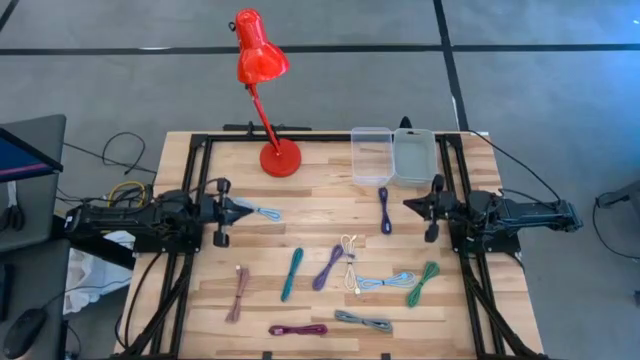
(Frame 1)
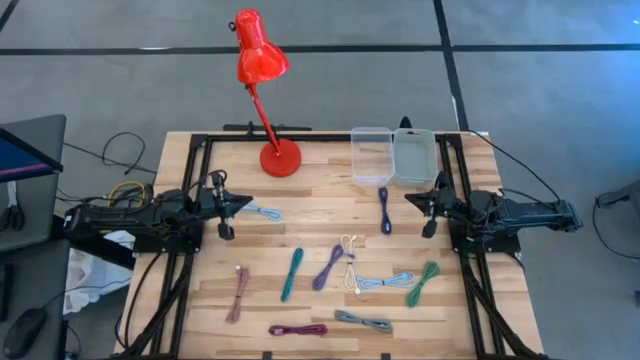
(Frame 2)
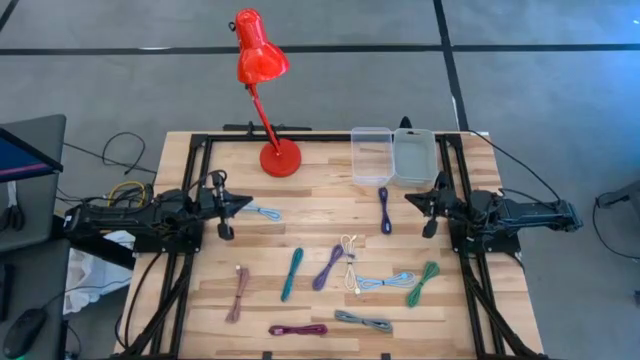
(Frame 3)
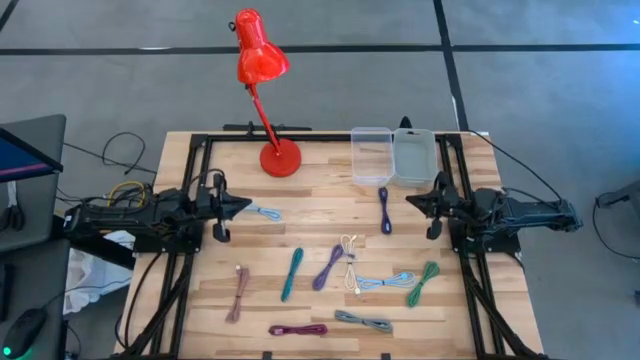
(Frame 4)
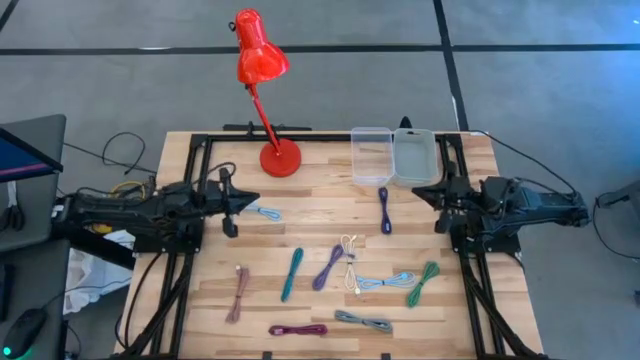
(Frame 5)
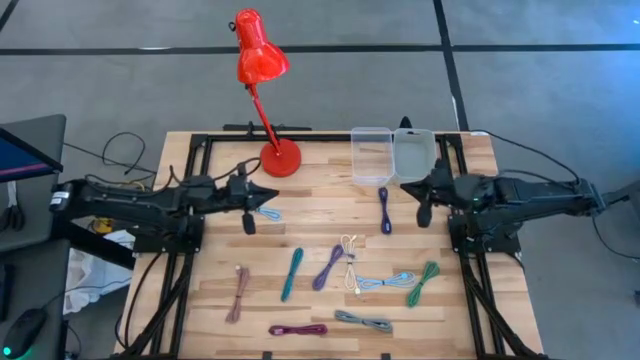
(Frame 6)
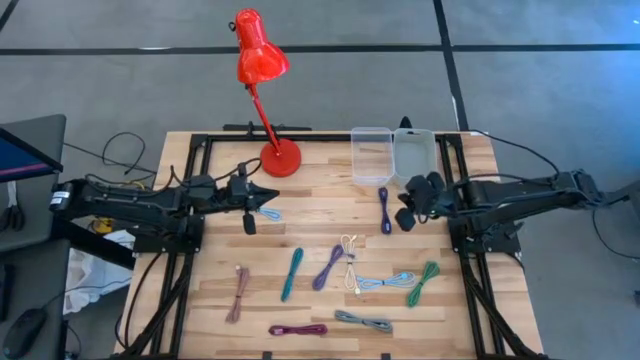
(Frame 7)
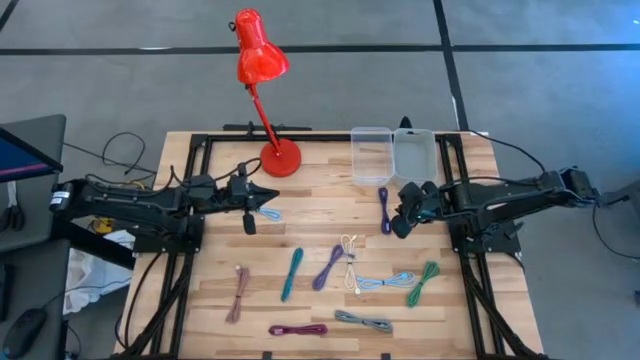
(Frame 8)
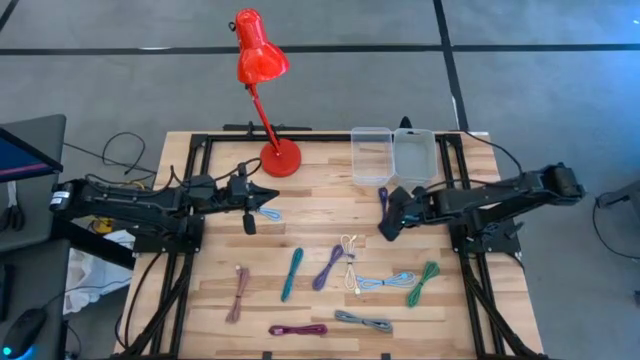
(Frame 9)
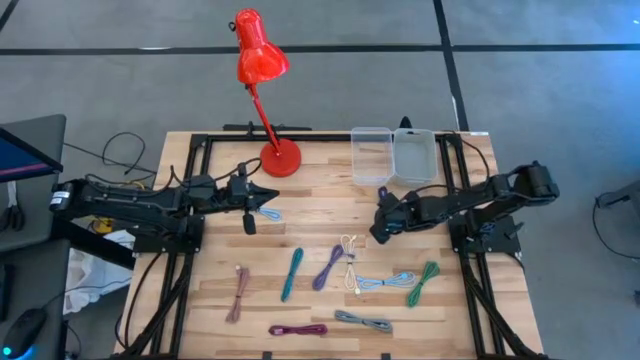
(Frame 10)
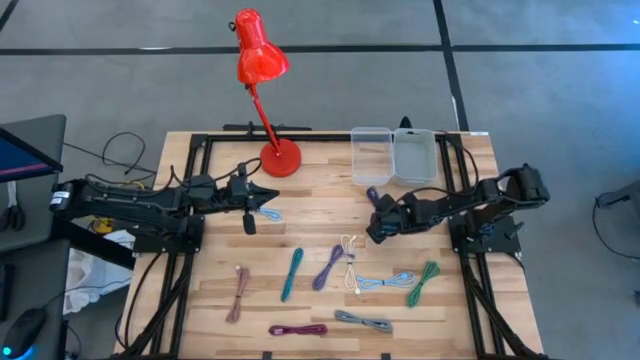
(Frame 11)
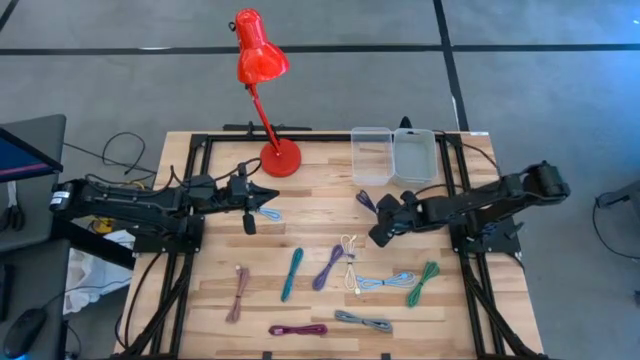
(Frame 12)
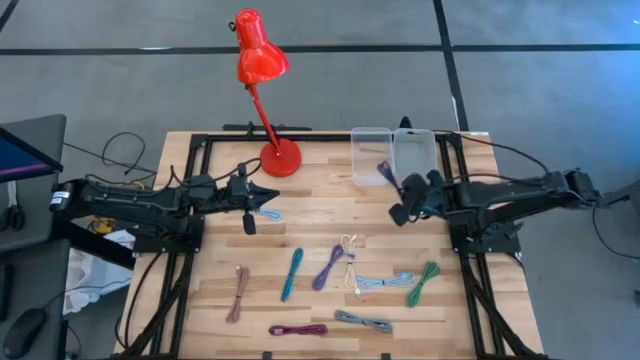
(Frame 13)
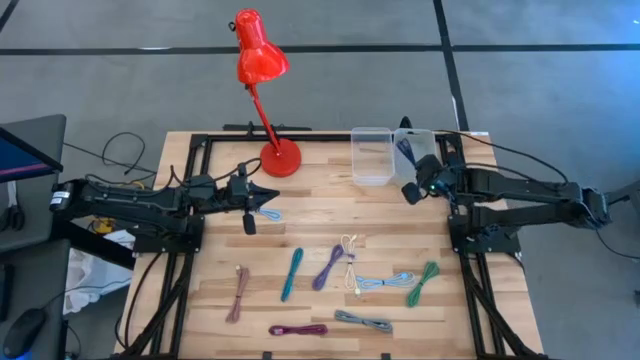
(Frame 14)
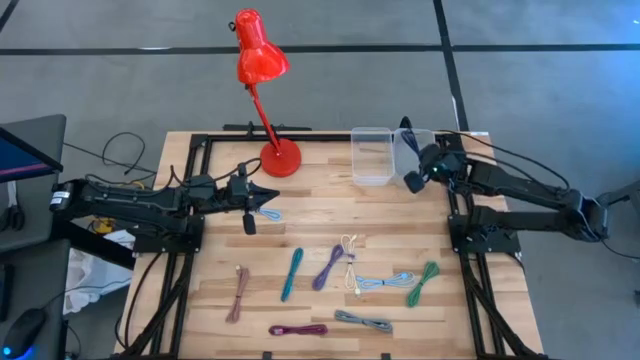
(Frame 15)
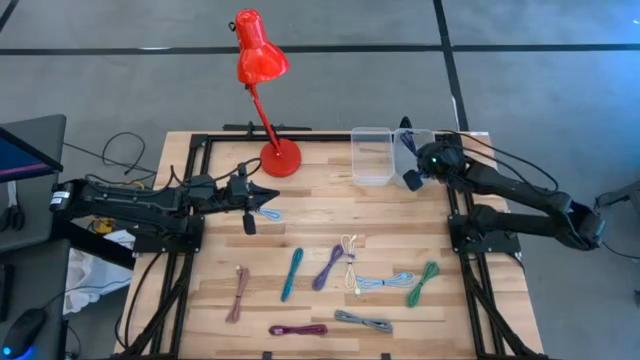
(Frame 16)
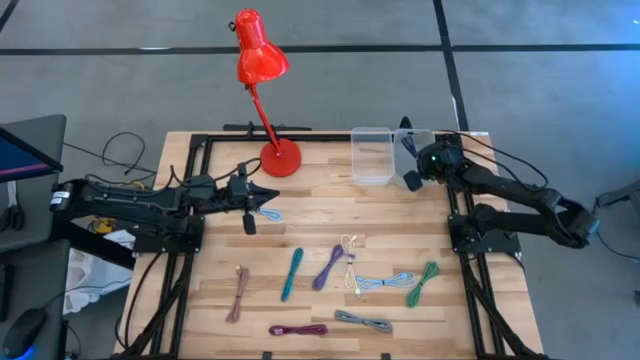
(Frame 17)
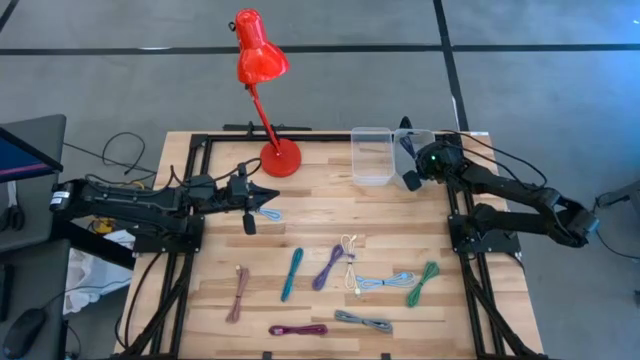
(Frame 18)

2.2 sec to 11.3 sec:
Task: Pick & Place USB Port
Put the black and violet charger cable into the gray bin

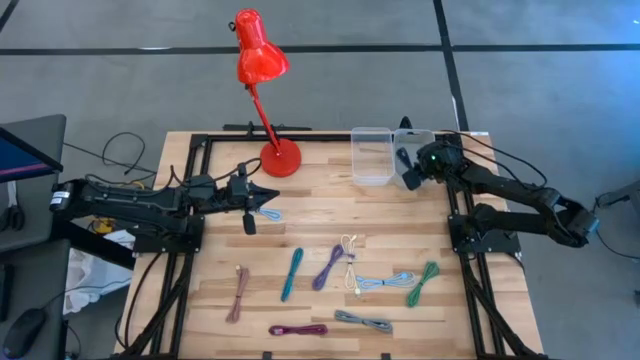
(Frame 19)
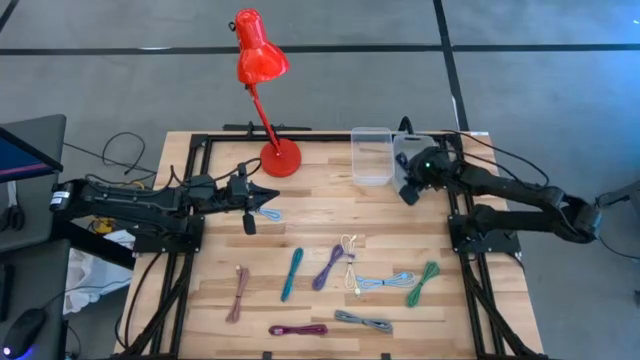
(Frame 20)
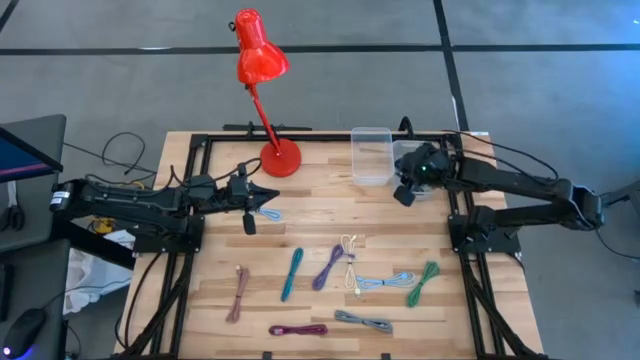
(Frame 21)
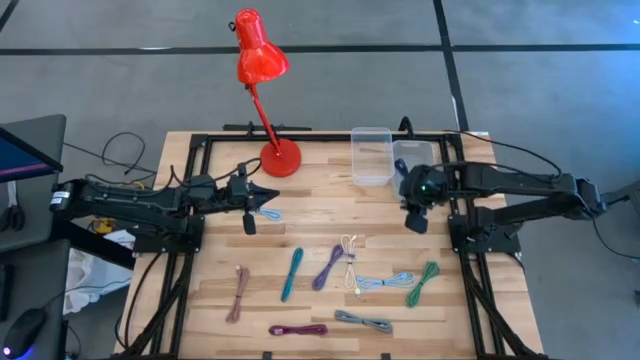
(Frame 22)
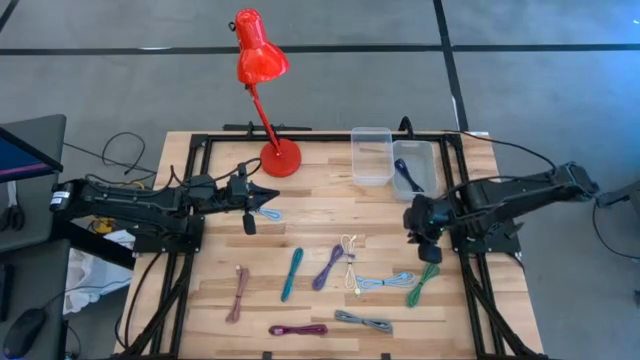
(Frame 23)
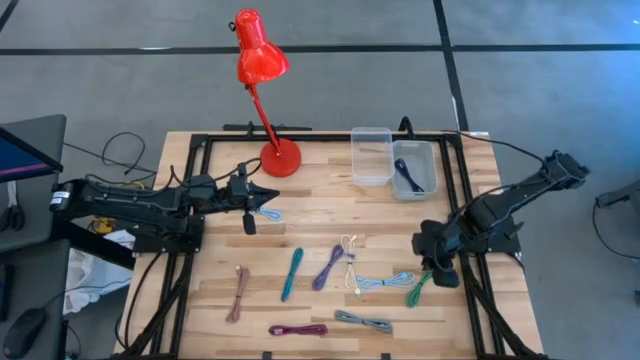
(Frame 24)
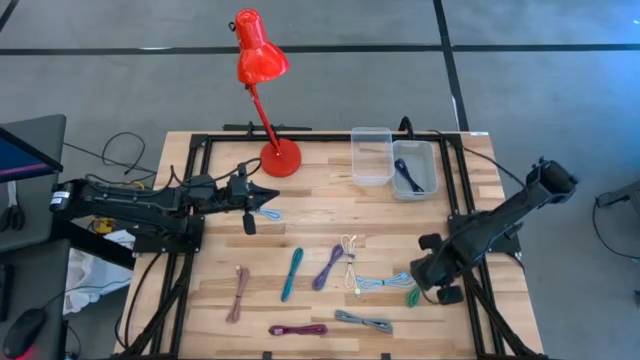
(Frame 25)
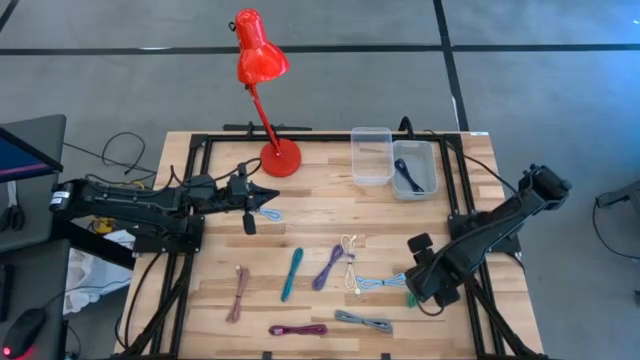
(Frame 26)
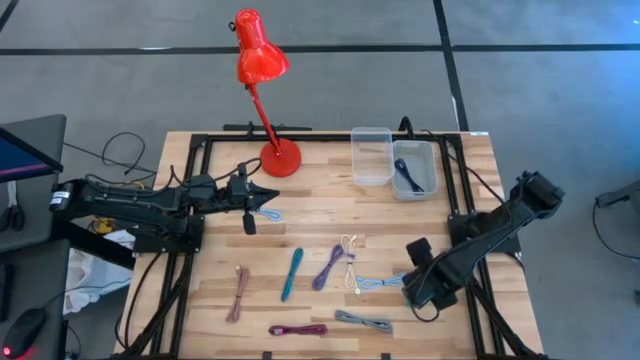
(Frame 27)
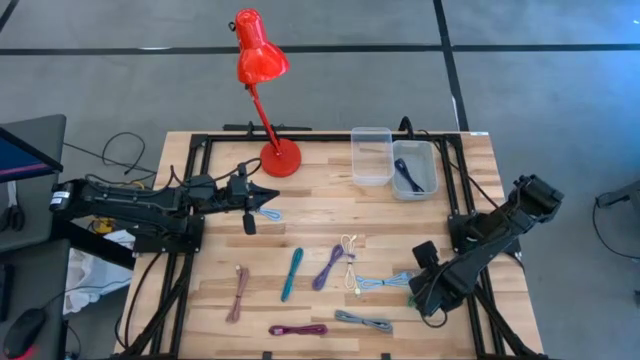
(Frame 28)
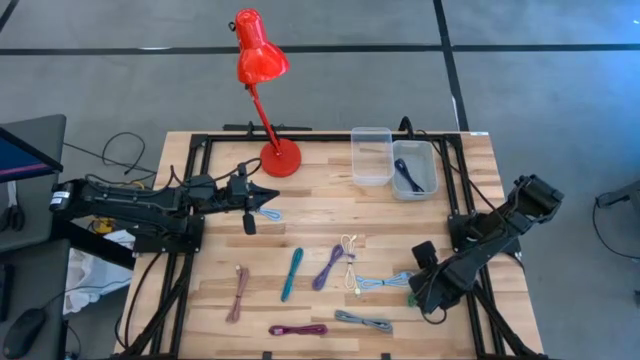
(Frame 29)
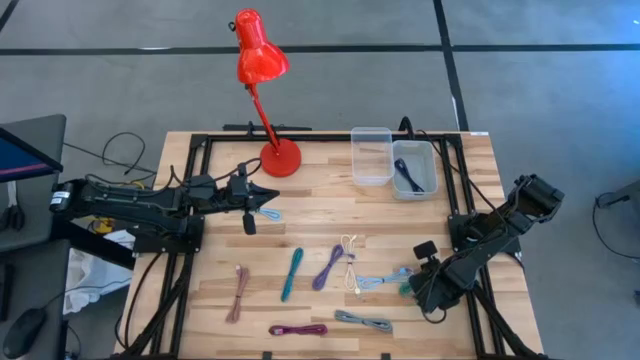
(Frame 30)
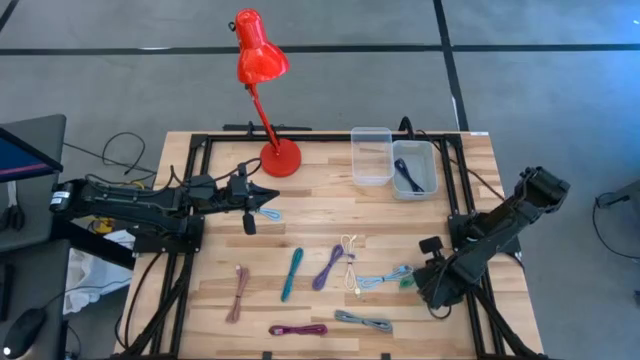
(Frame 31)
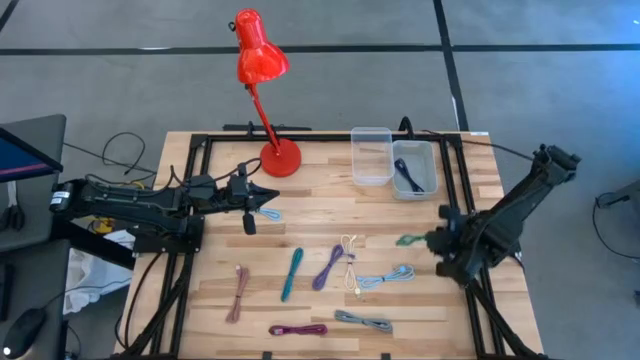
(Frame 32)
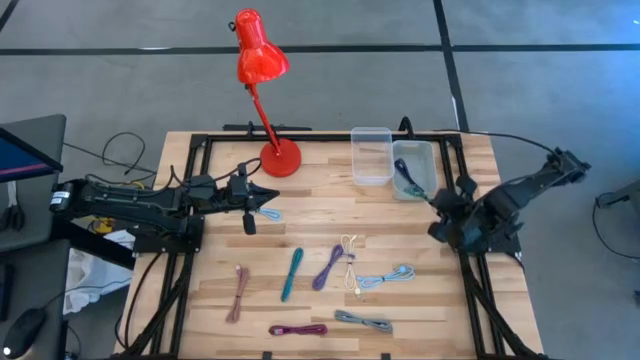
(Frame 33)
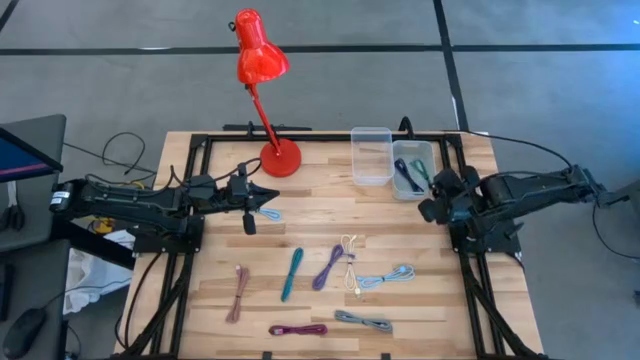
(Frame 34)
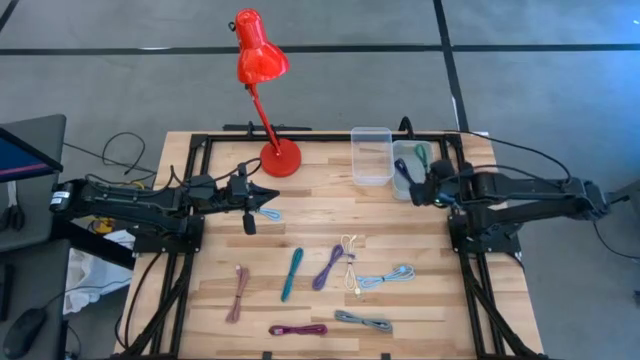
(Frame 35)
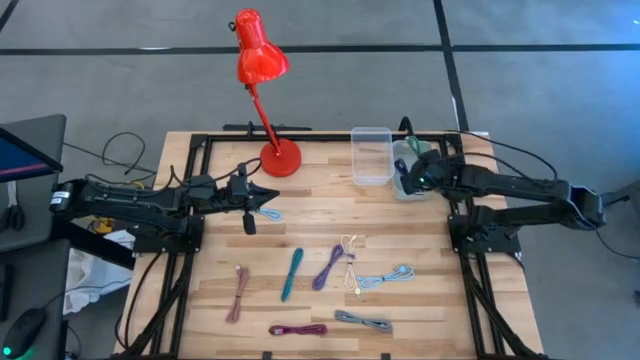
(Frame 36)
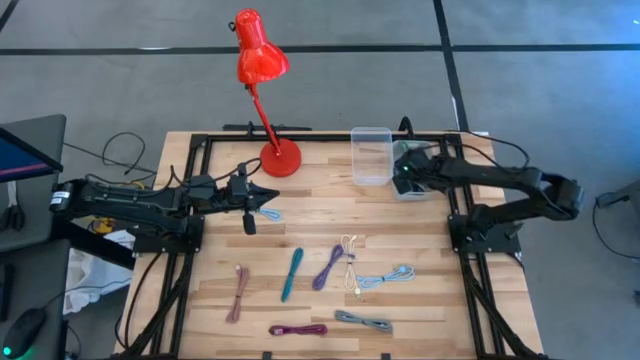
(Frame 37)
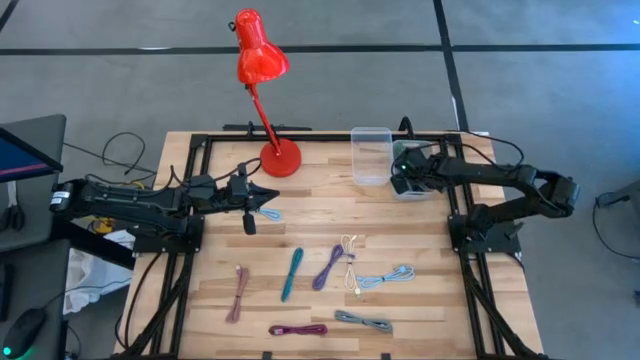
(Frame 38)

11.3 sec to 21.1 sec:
Put the green charger cable into the transparent bin

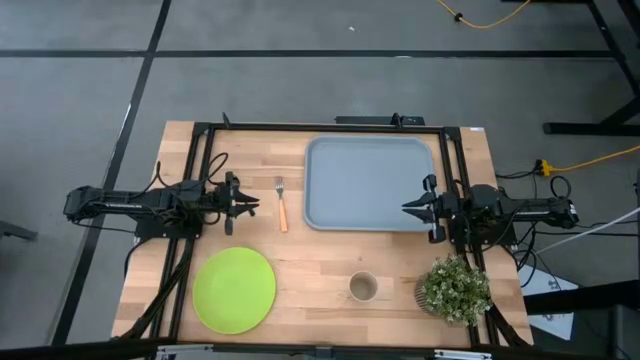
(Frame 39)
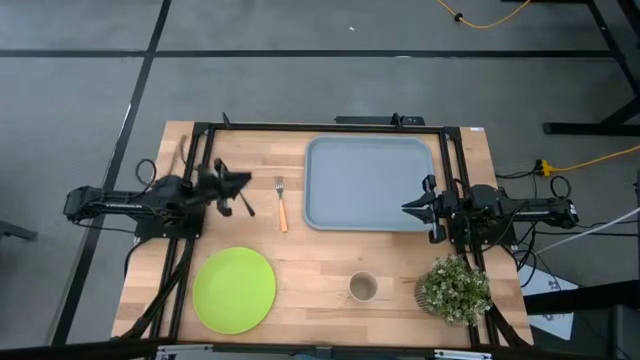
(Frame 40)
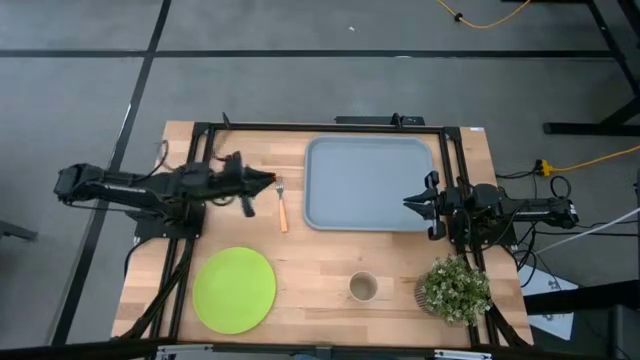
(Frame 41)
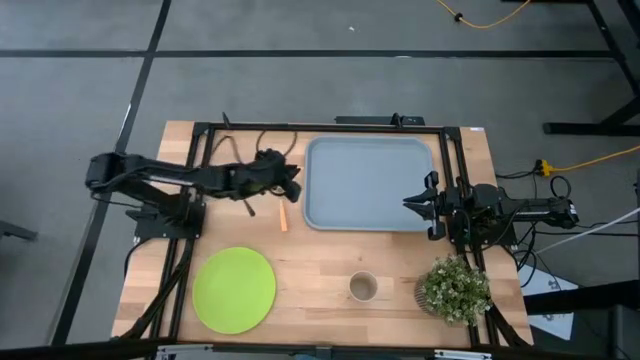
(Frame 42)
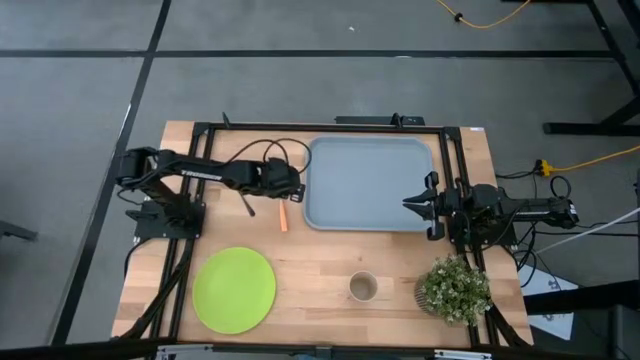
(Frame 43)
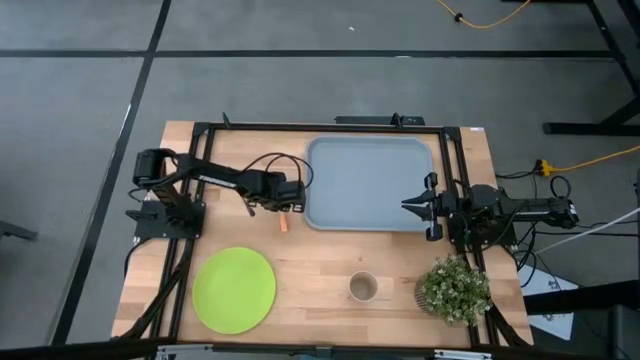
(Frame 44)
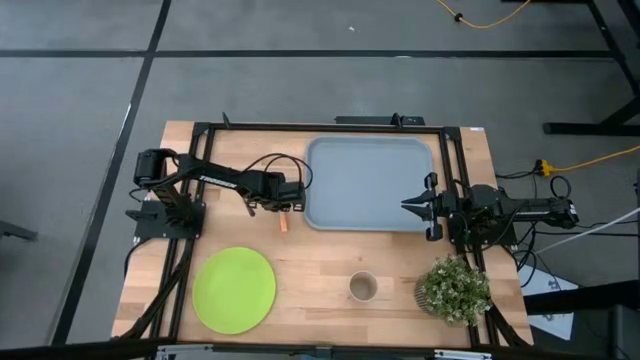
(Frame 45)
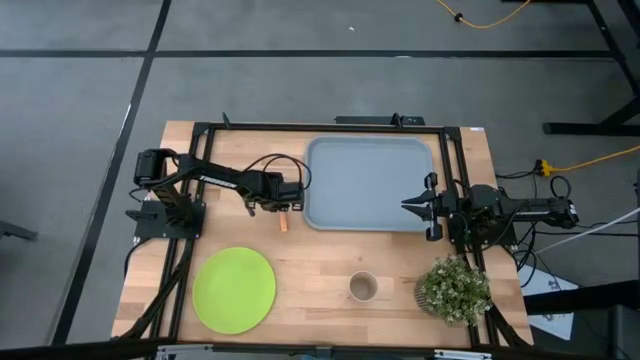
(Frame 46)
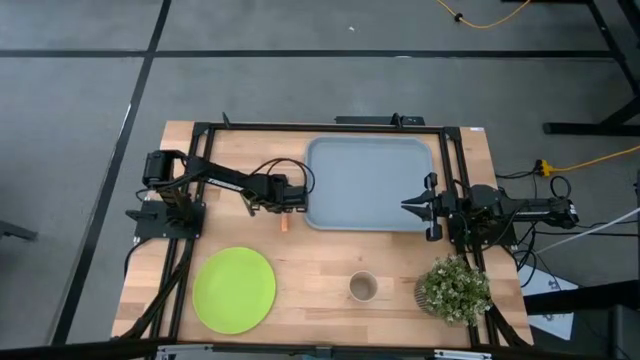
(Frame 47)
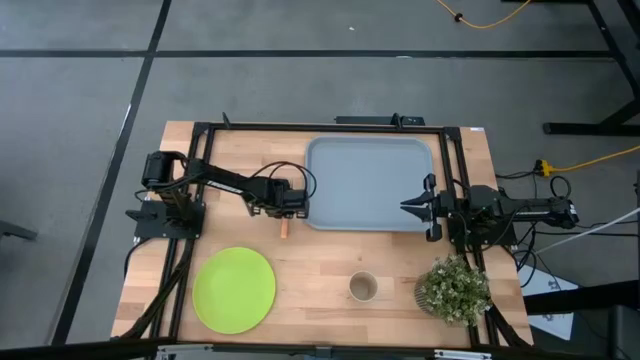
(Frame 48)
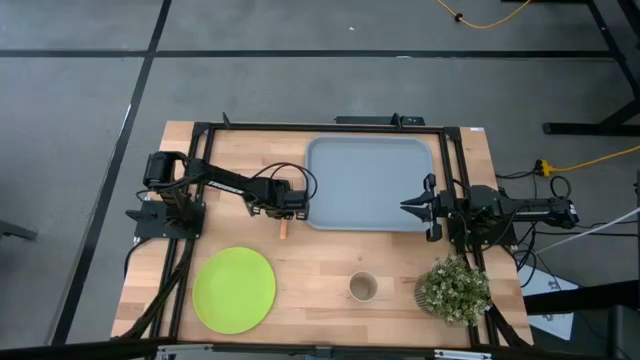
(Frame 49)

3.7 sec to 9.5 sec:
Task: Pick and place plate/cup/fork/spoon on tray
Put the light orange fork on the light blue tray
